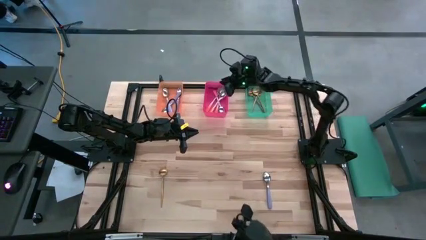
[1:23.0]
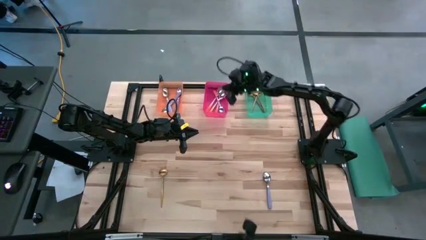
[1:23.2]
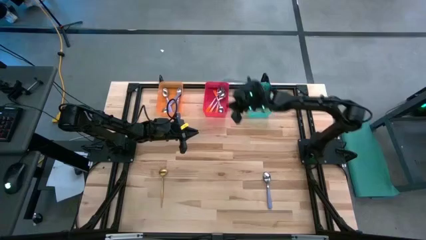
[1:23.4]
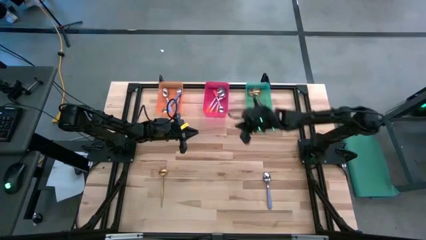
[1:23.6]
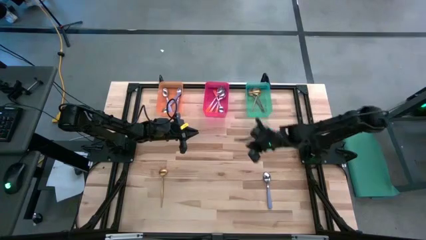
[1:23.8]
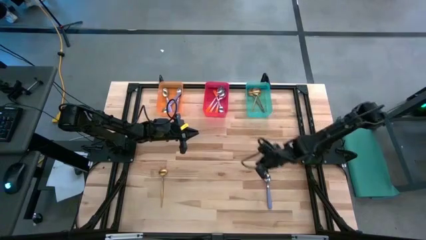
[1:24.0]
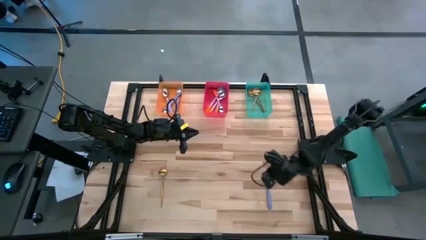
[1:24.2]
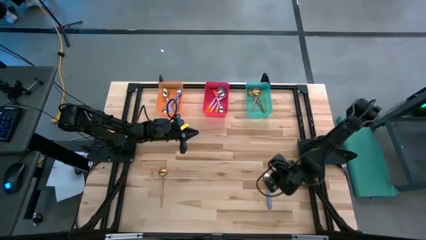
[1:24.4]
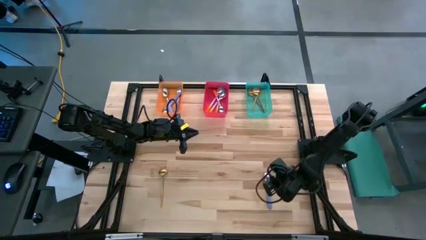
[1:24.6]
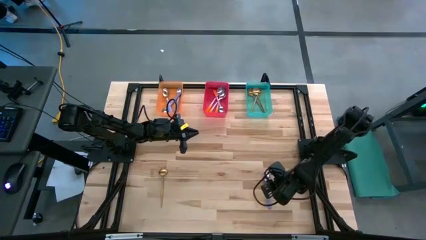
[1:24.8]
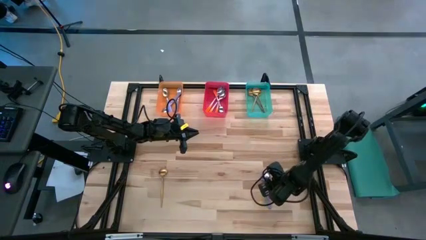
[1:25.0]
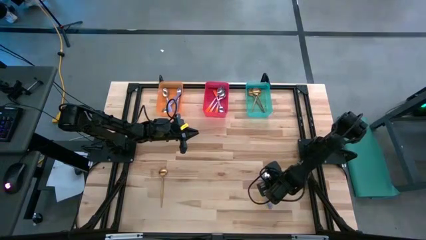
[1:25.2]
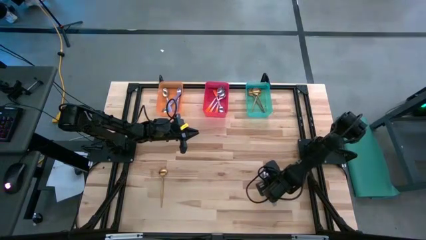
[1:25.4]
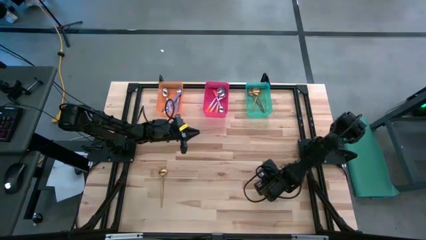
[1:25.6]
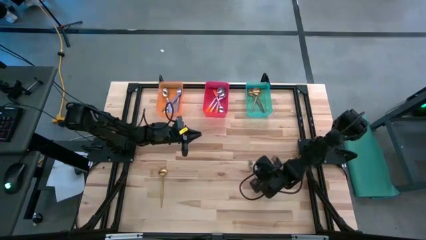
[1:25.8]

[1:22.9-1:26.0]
Task: Sort silverware by color (type)
Put the purple spoon into the orange bin

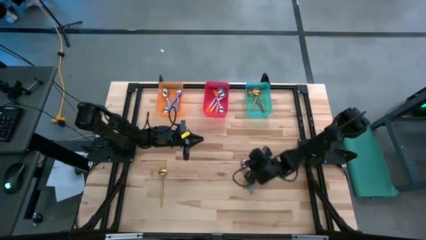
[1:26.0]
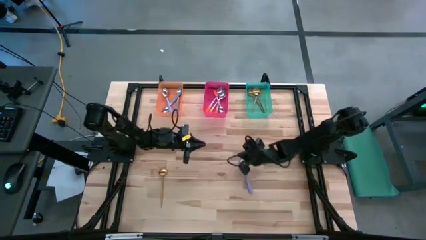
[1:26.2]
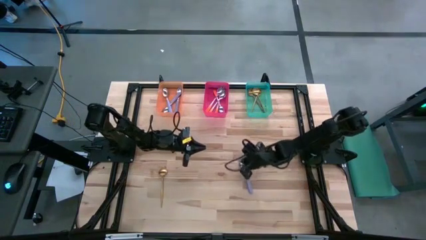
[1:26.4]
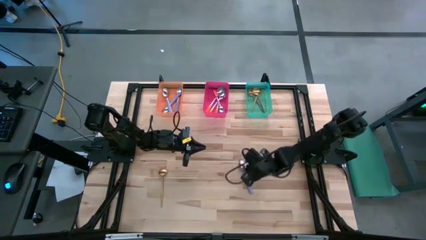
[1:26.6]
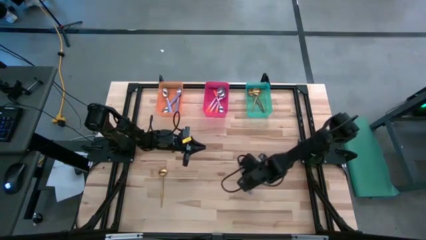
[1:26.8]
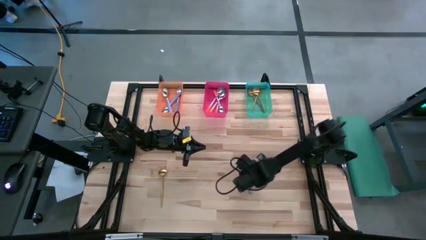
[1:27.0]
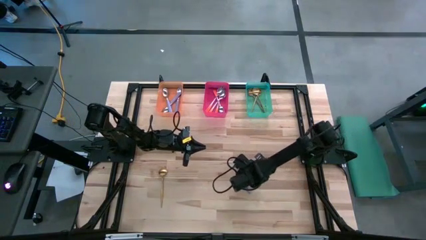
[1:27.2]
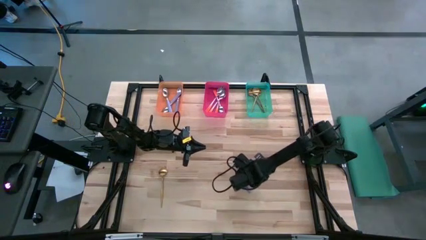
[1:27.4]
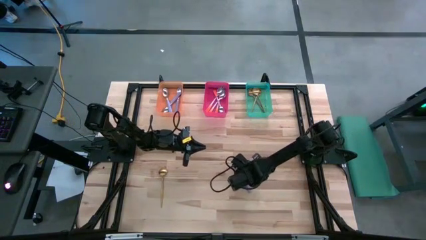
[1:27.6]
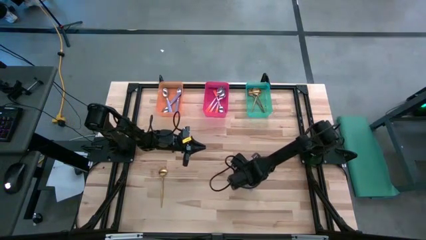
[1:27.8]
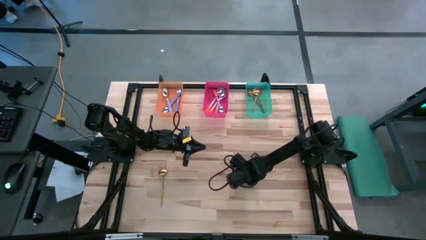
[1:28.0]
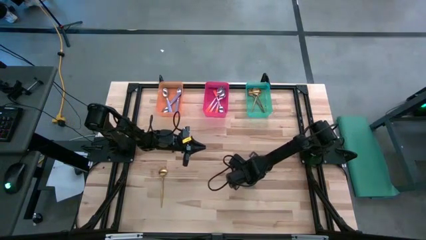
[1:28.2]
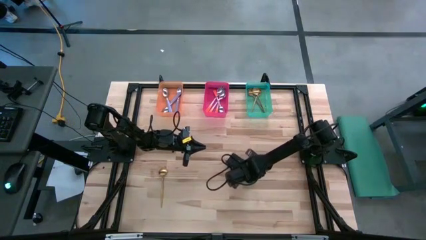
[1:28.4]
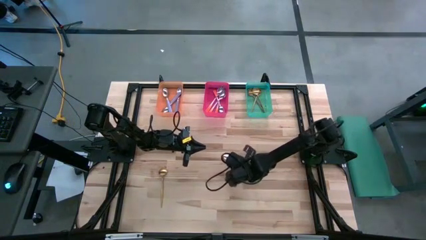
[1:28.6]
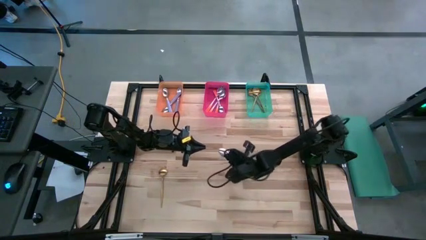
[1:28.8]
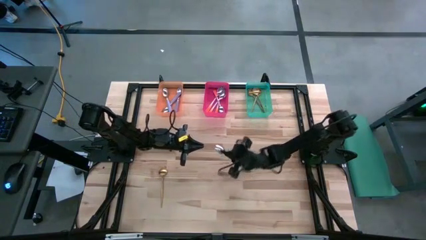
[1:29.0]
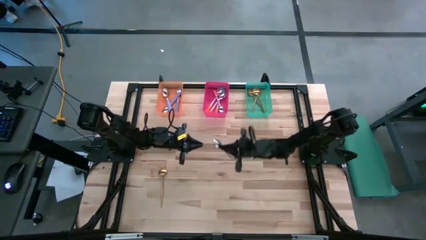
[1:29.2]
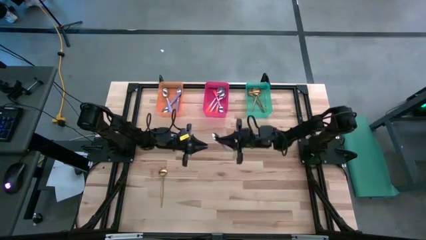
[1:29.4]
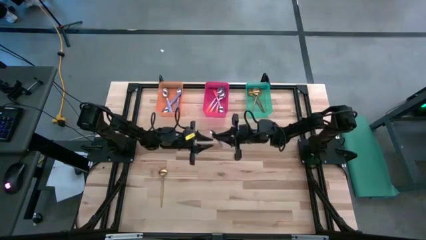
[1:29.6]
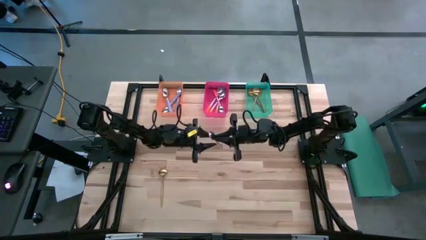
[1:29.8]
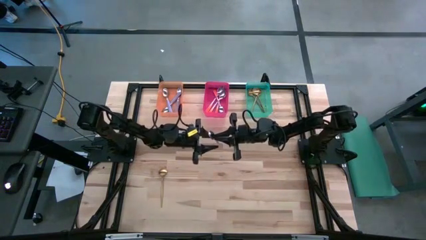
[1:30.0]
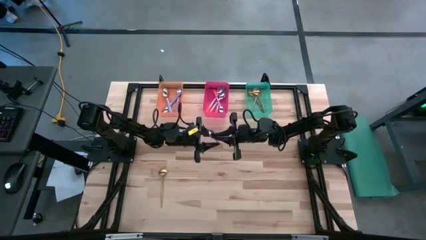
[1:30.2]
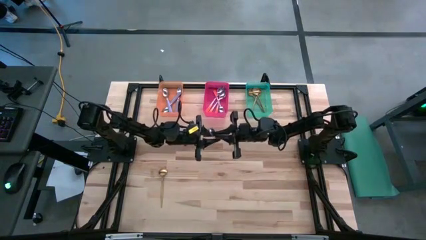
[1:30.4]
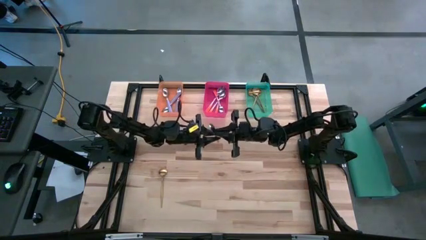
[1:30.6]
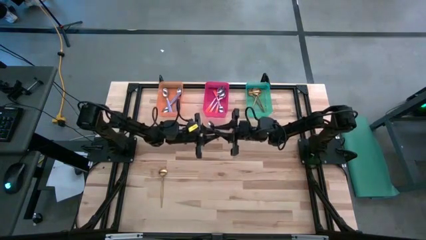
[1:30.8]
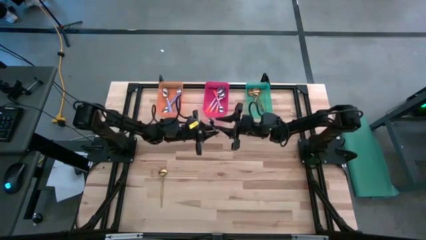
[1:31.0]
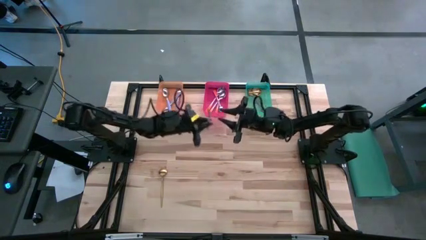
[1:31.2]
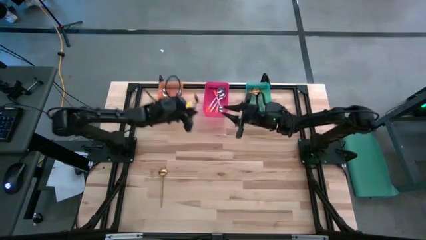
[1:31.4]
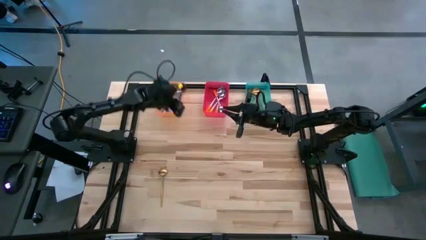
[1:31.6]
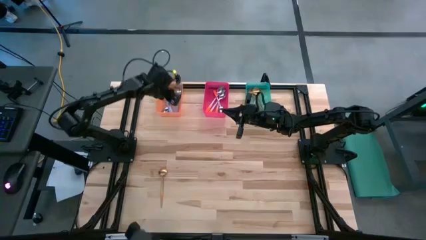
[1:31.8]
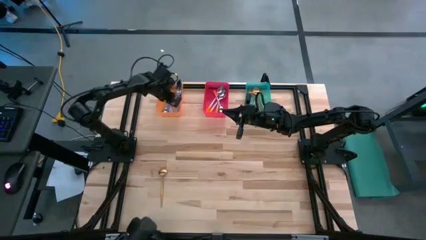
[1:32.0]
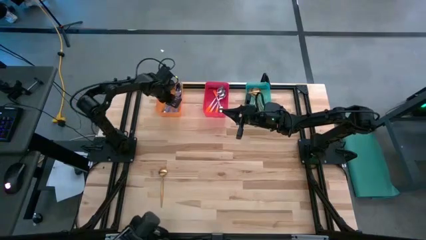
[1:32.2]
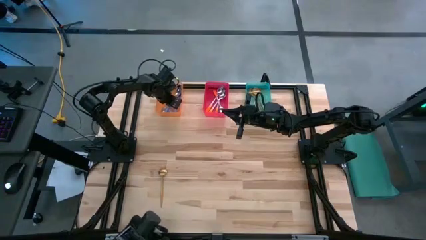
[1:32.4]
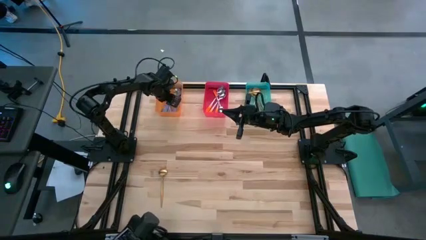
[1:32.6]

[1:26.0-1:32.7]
Put the purple spoon into the orange bin

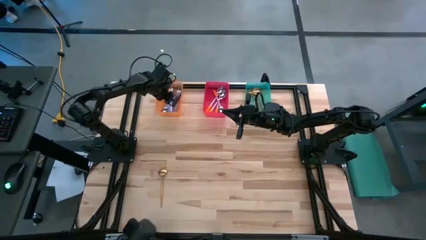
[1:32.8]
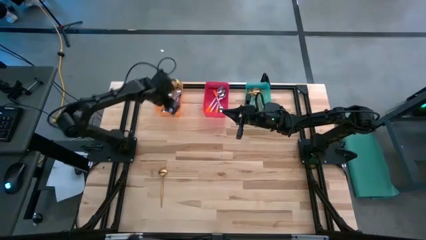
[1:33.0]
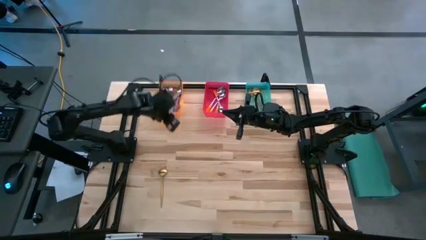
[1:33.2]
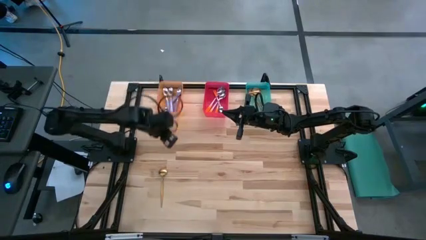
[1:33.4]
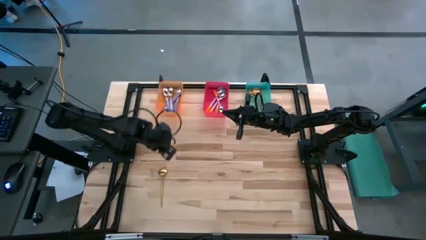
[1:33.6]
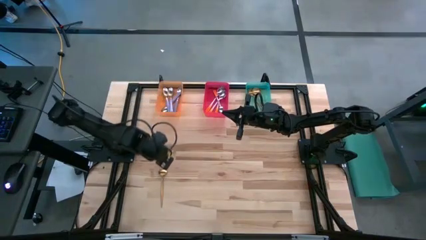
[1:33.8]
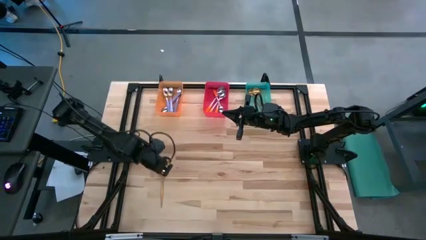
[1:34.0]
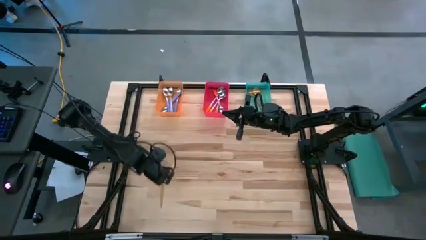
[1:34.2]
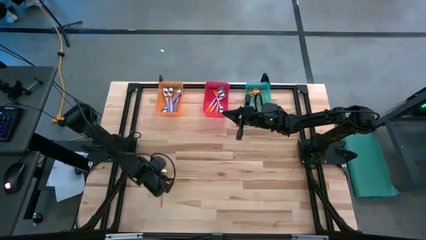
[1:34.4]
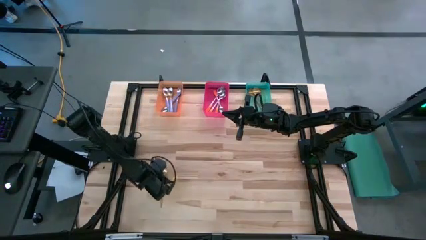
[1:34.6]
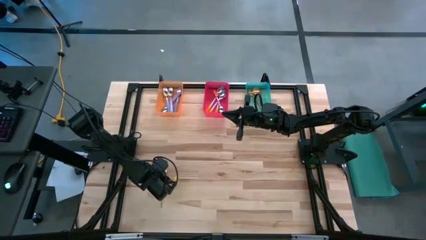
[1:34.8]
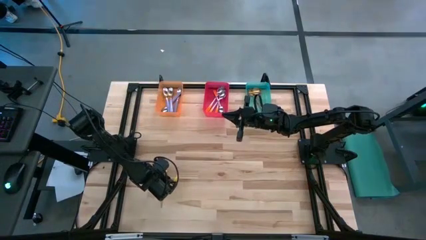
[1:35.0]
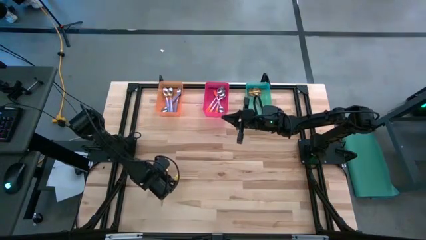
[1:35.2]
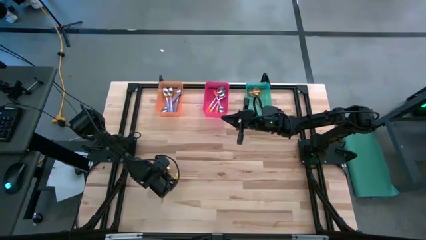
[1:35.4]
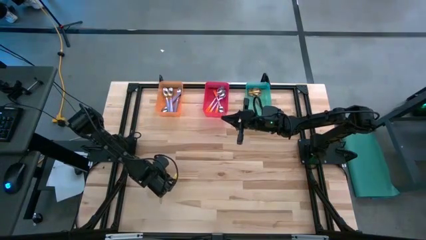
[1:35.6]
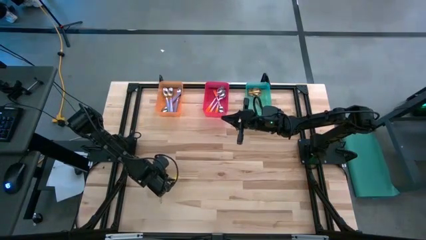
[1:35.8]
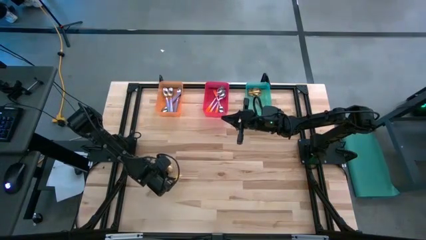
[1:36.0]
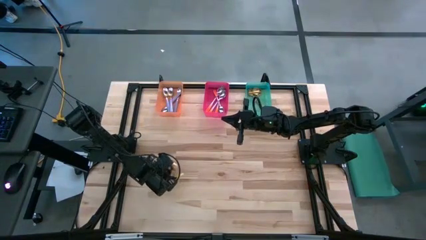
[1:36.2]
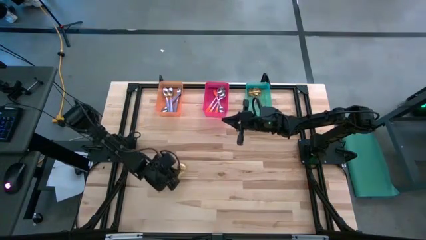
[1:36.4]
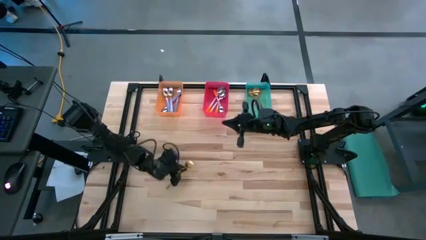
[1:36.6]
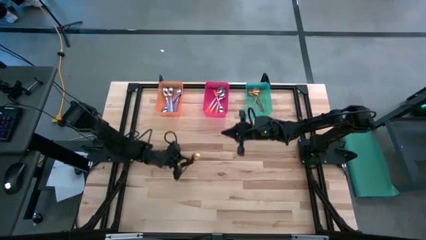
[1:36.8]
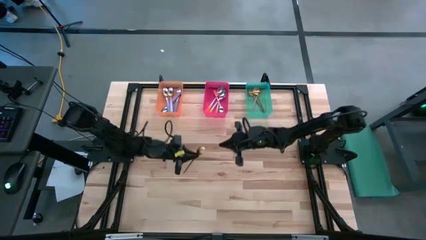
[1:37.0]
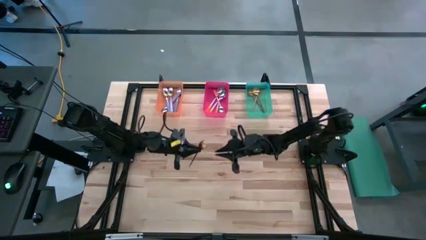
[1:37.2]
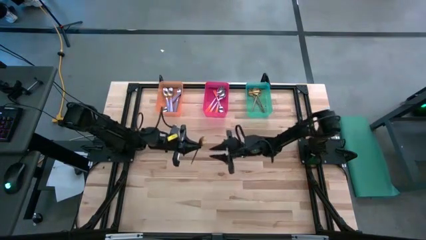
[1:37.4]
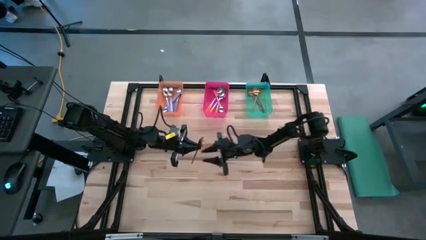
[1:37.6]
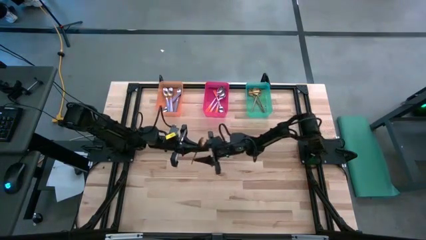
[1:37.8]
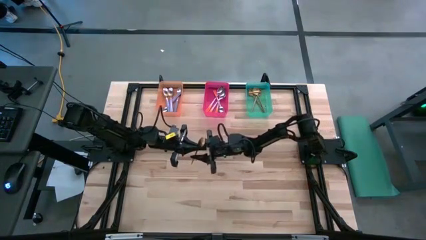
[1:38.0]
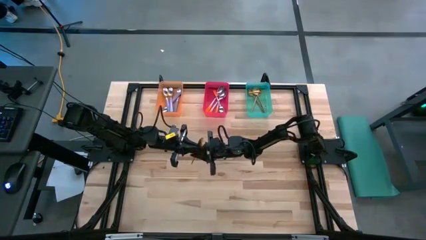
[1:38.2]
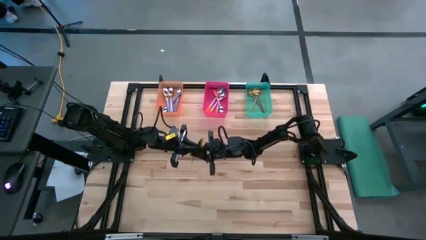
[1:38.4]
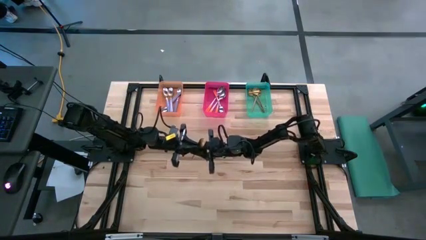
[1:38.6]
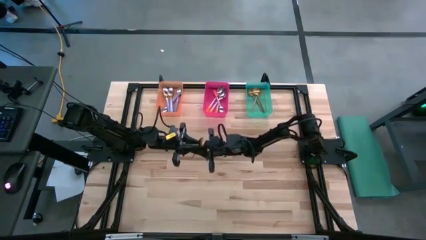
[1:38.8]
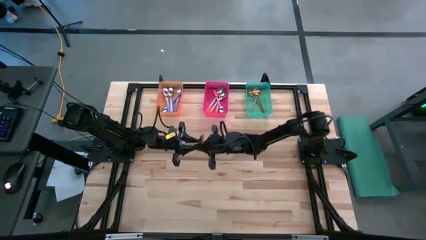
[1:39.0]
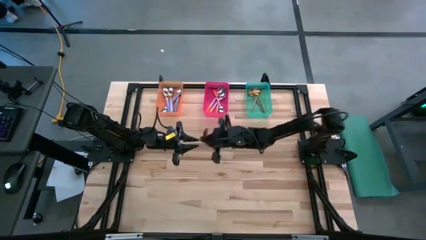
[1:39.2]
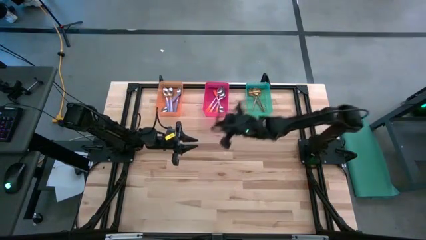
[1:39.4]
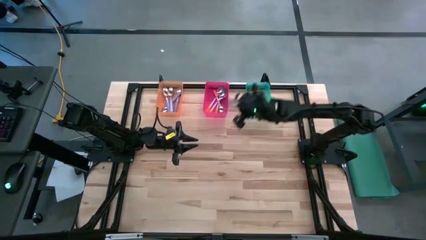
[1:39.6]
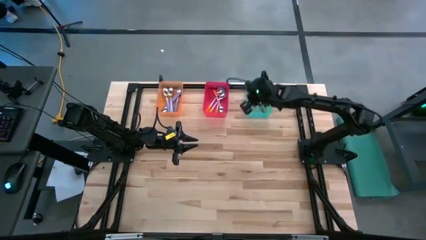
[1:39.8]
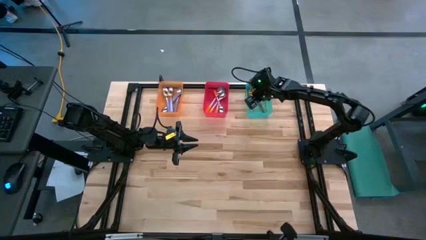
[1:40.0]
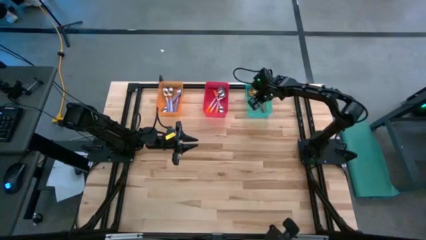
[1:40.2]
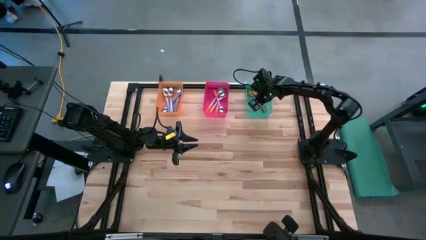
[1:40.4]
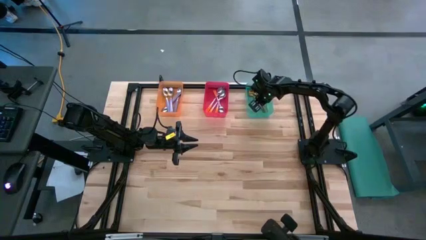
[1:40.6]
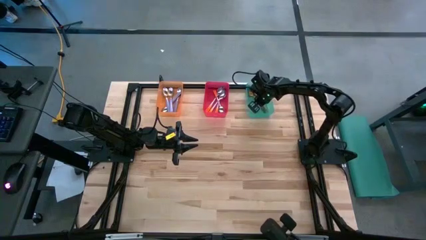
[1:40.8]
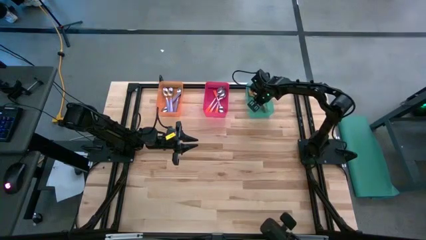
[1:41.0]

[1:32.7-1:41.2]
Put the golden spoon into the green bin

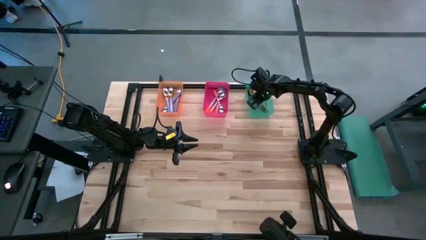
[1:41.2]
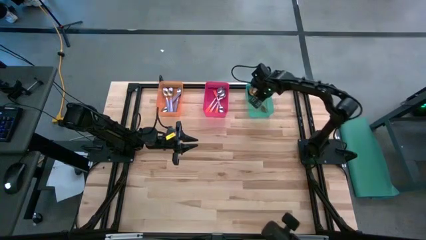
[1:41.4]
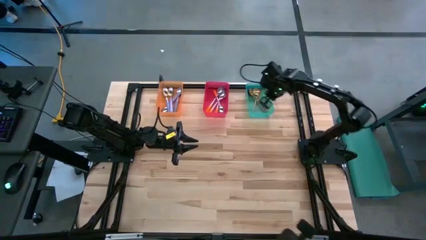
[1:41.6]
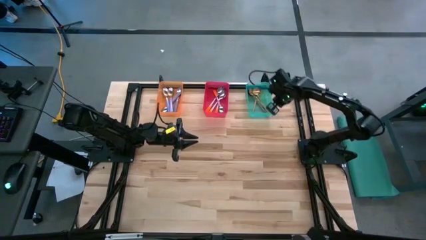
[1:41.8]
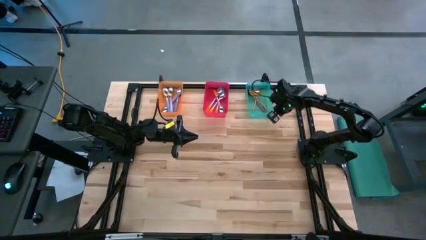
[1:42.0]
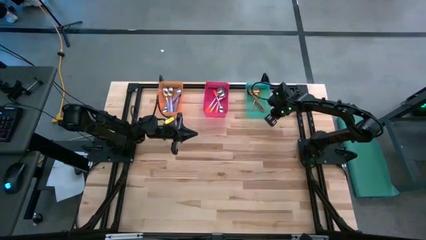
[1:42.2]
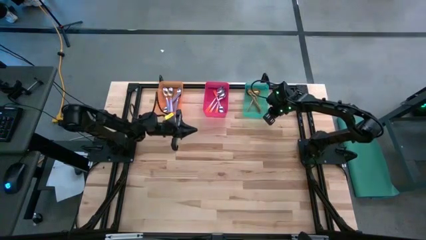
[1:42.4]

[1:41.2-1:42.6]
Adjust the green bin
